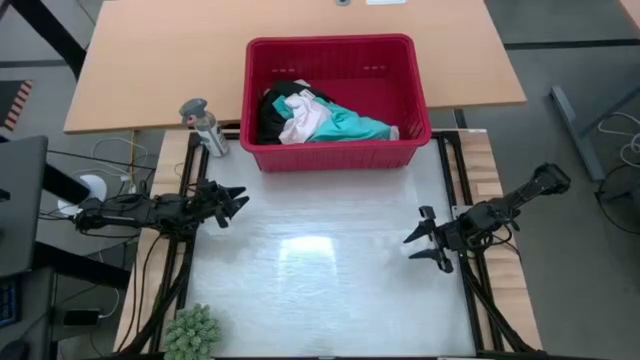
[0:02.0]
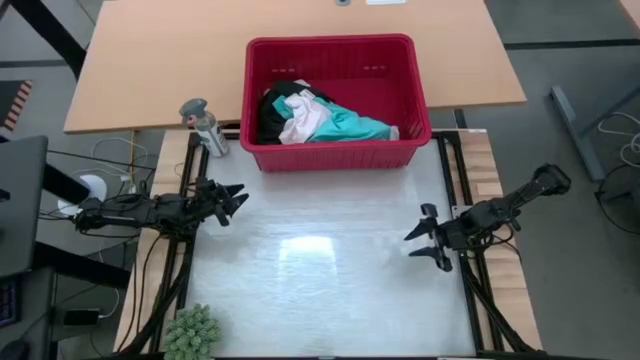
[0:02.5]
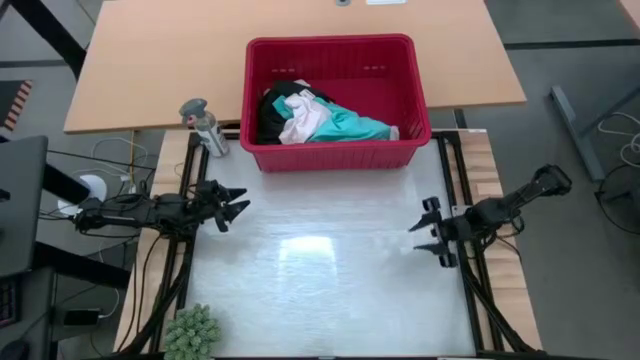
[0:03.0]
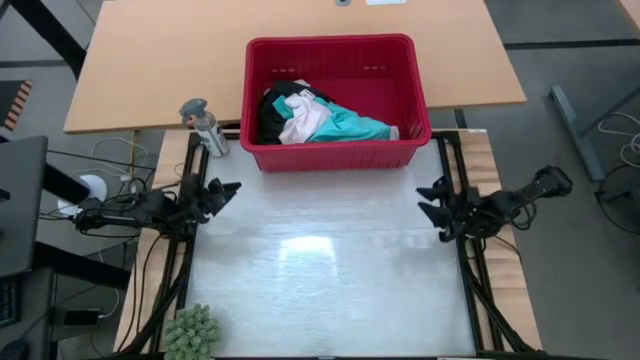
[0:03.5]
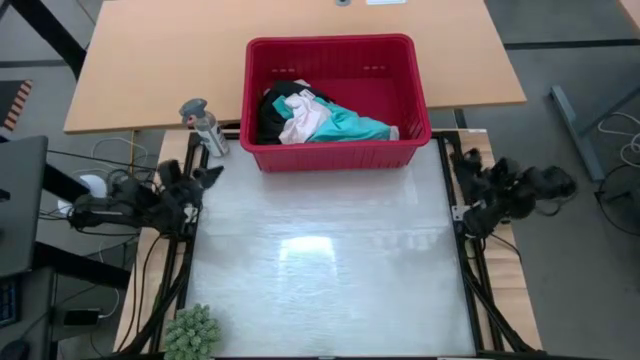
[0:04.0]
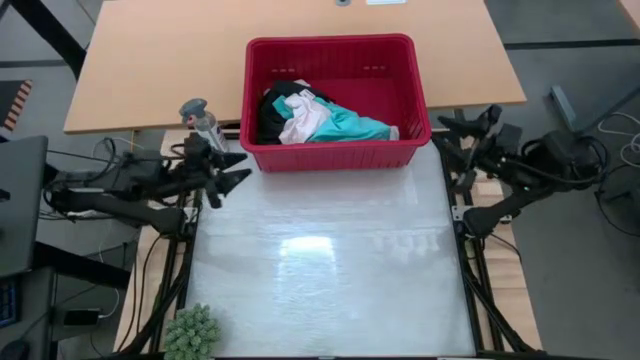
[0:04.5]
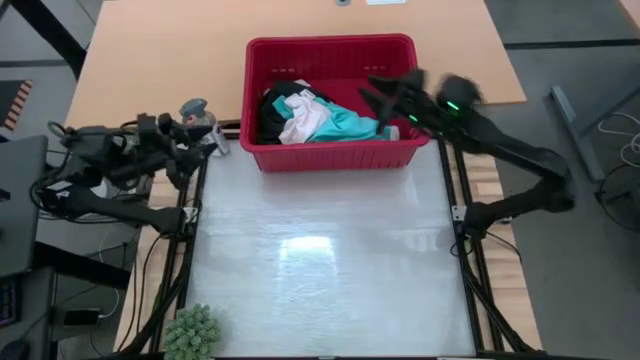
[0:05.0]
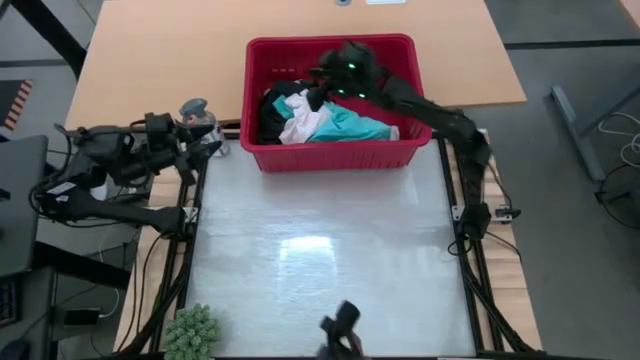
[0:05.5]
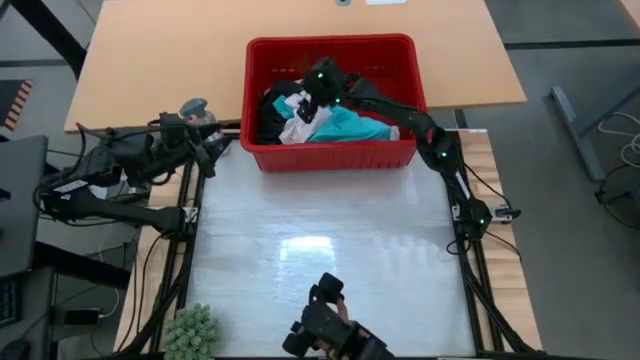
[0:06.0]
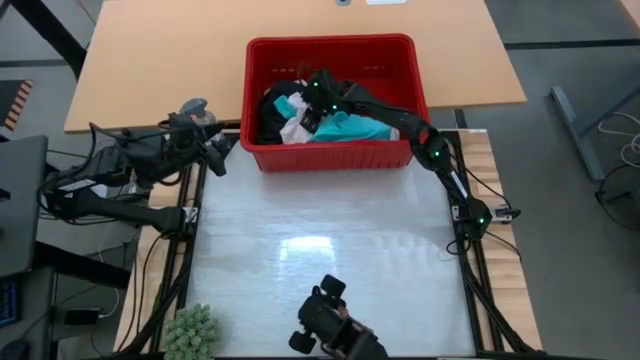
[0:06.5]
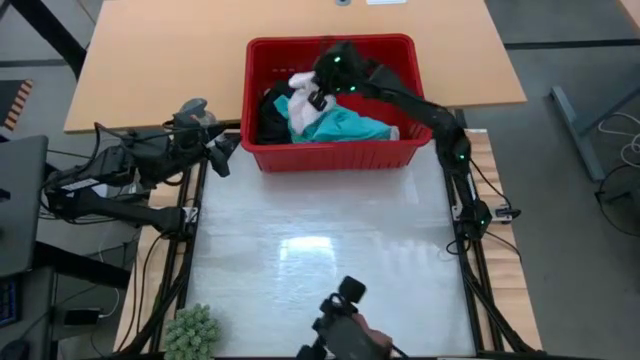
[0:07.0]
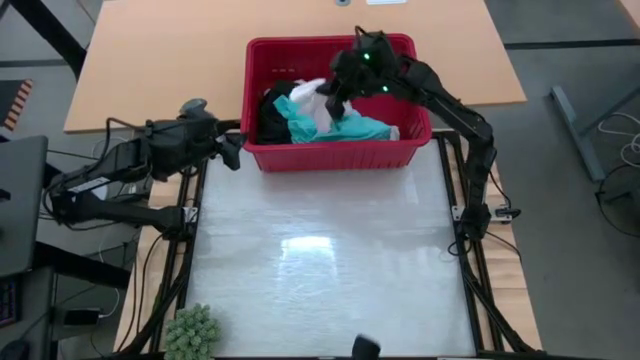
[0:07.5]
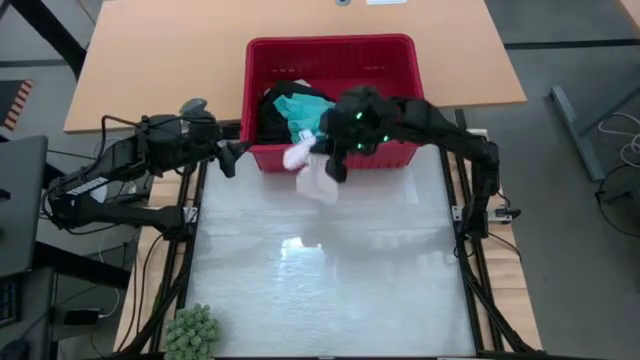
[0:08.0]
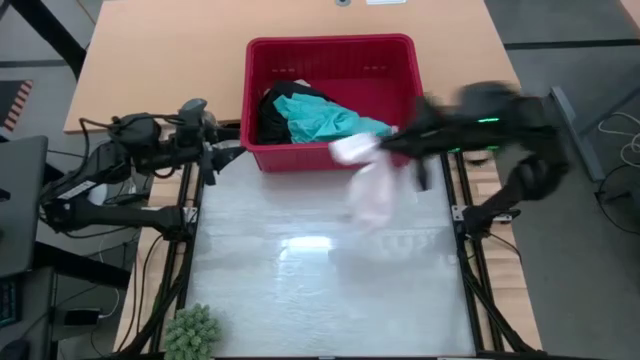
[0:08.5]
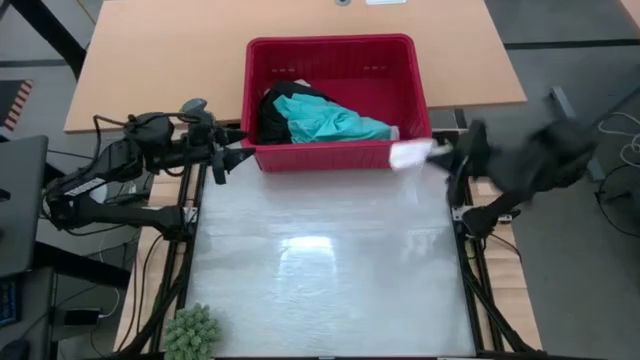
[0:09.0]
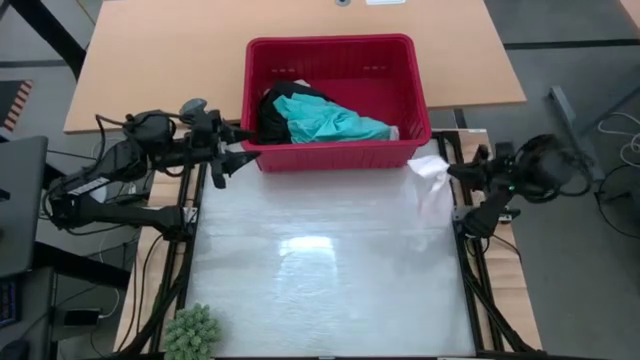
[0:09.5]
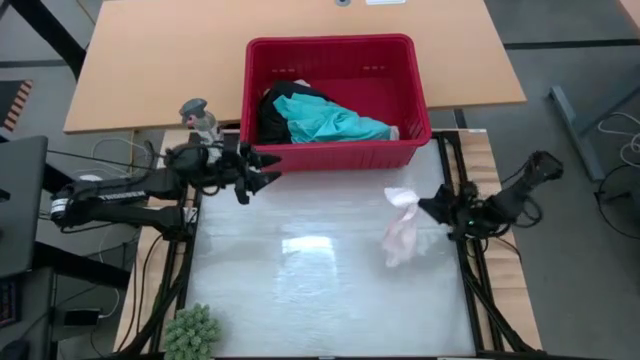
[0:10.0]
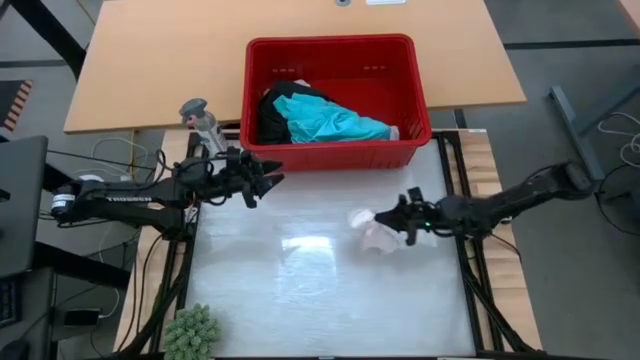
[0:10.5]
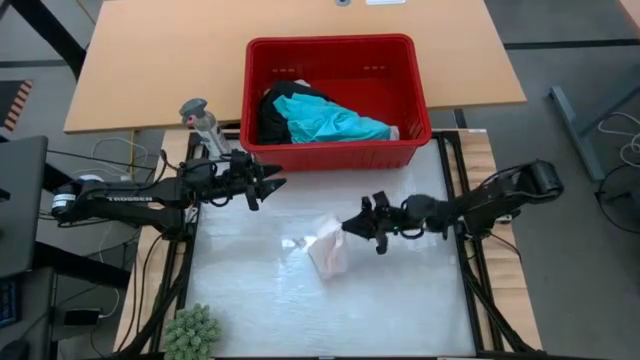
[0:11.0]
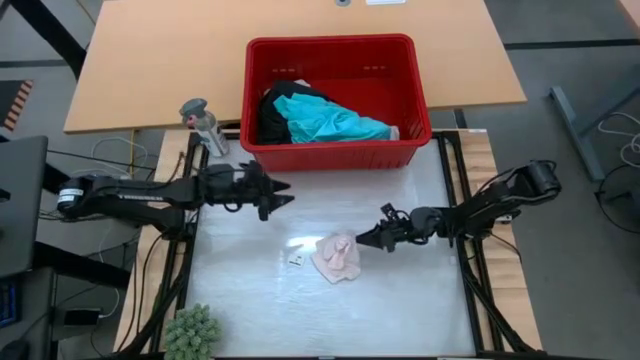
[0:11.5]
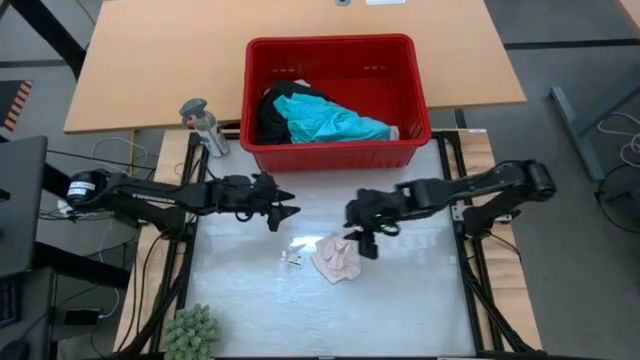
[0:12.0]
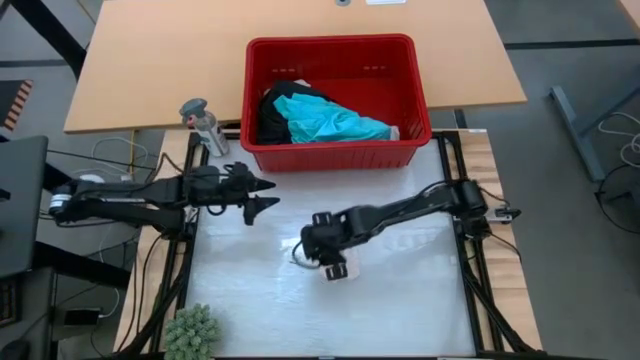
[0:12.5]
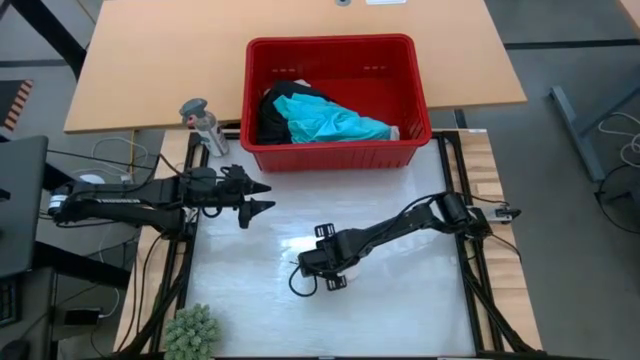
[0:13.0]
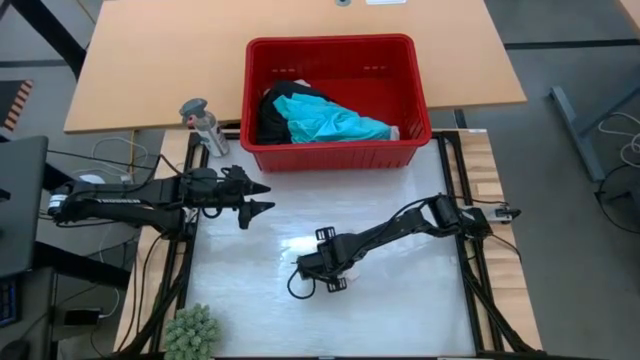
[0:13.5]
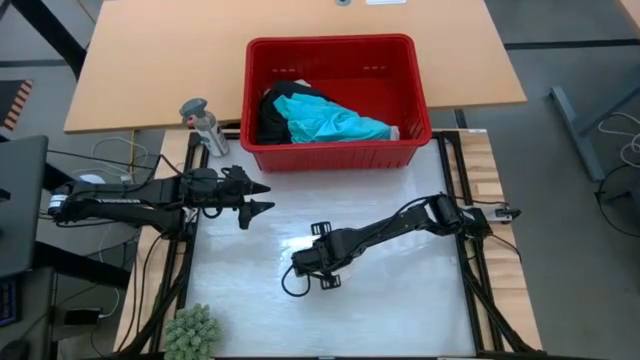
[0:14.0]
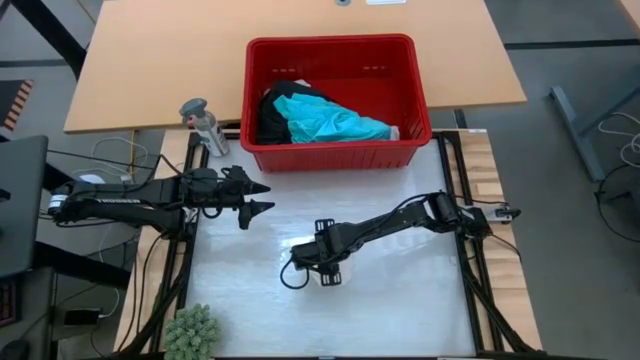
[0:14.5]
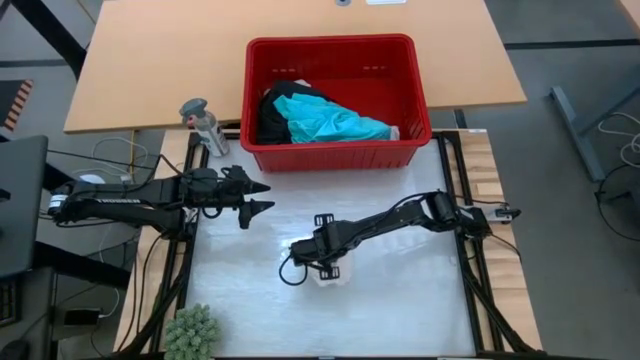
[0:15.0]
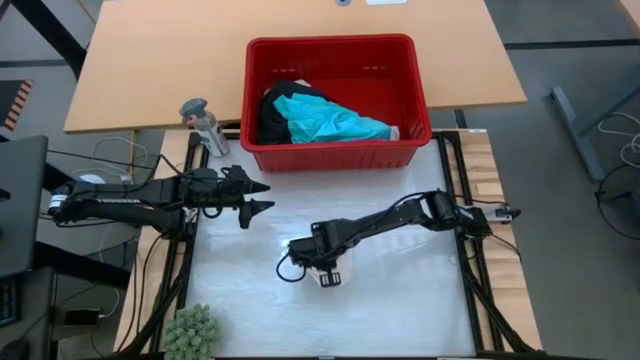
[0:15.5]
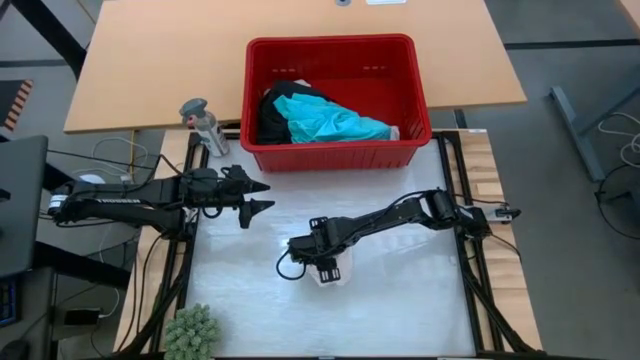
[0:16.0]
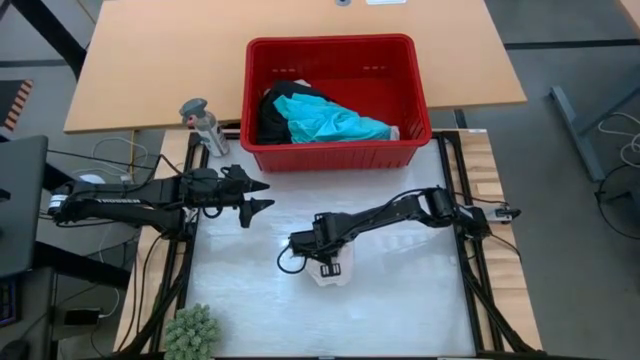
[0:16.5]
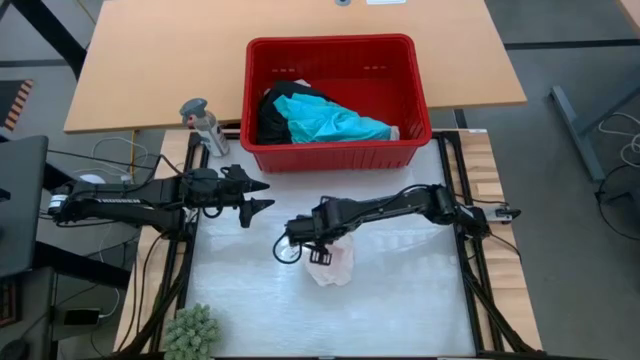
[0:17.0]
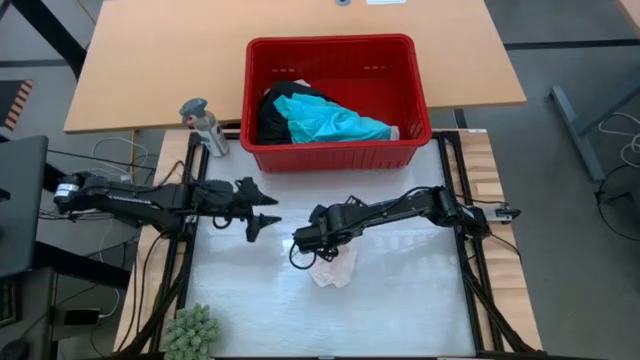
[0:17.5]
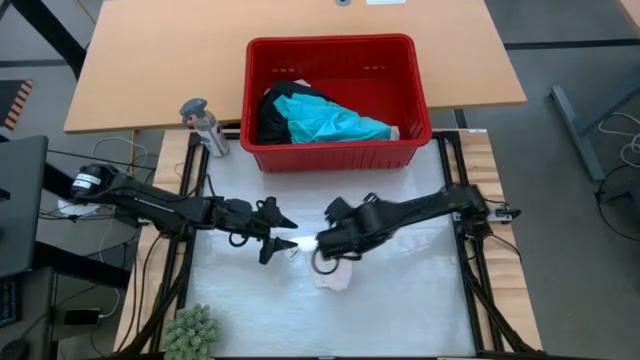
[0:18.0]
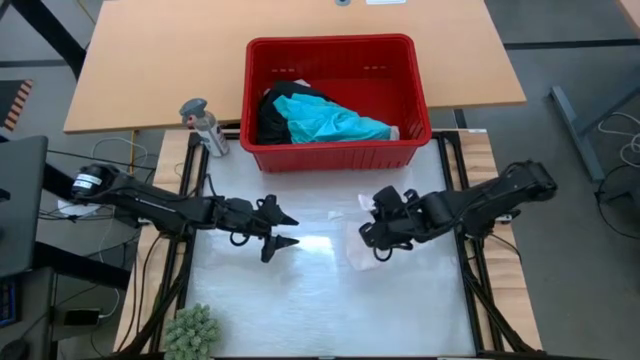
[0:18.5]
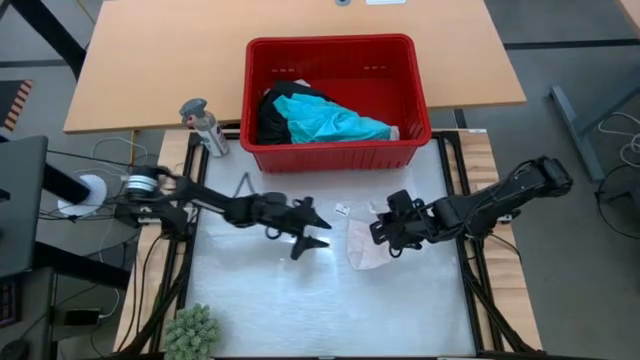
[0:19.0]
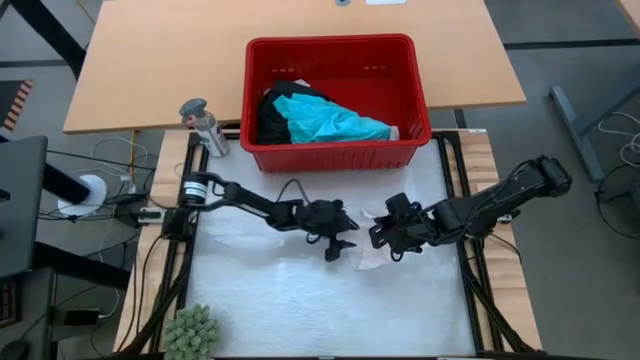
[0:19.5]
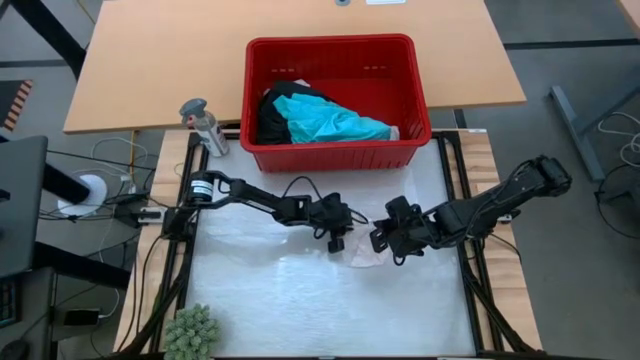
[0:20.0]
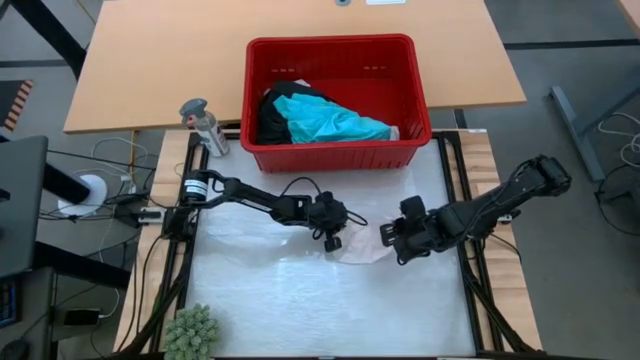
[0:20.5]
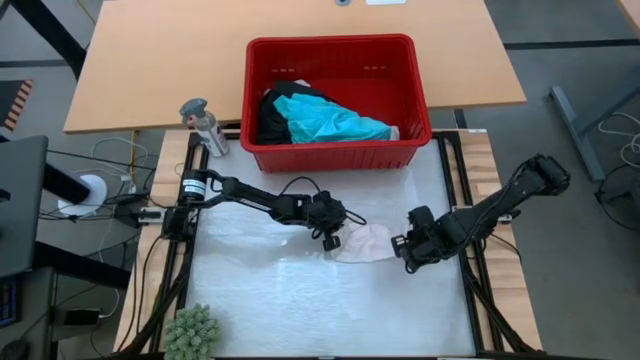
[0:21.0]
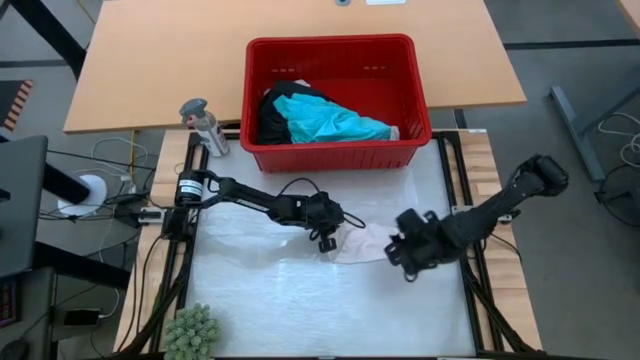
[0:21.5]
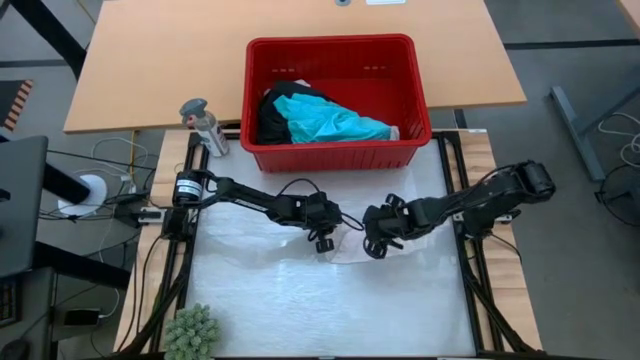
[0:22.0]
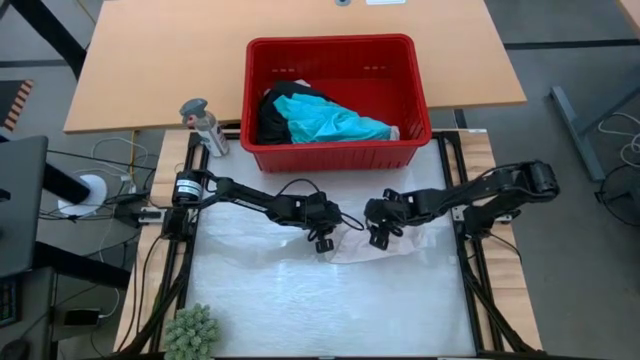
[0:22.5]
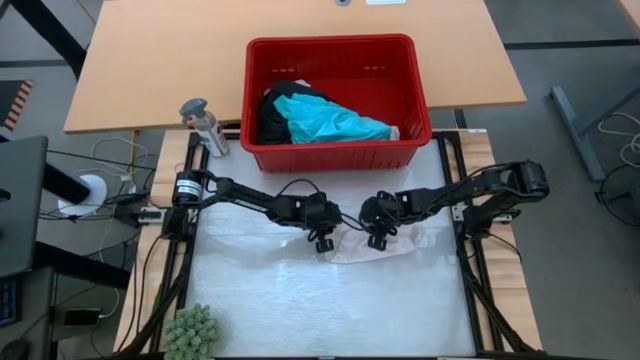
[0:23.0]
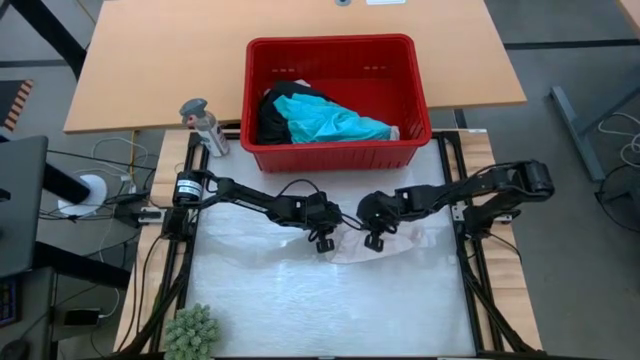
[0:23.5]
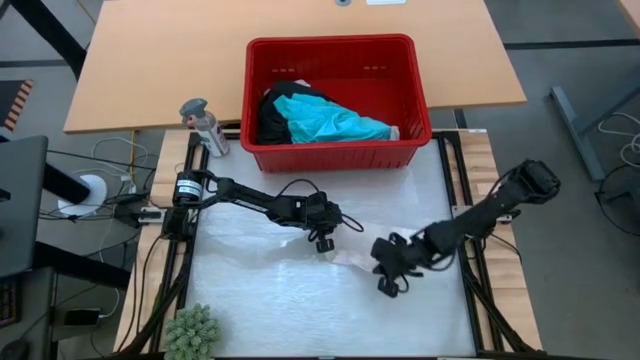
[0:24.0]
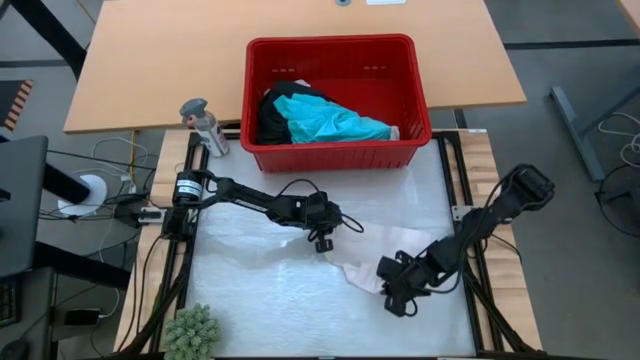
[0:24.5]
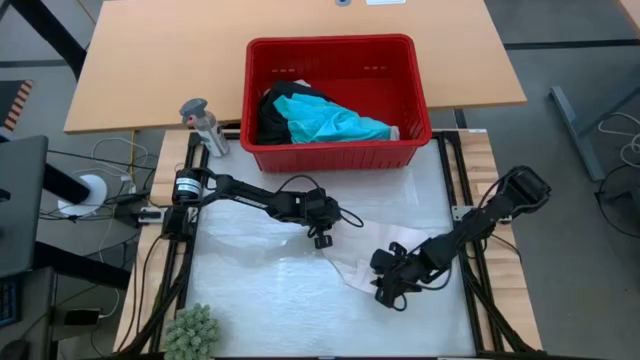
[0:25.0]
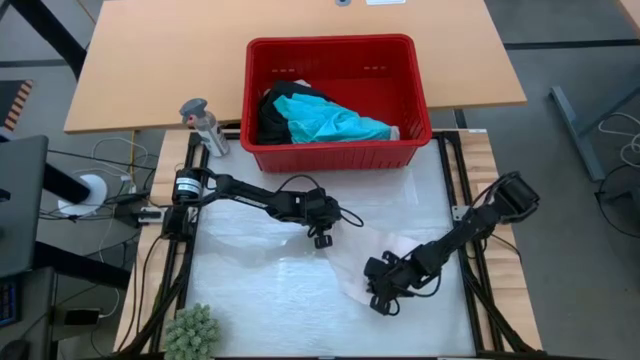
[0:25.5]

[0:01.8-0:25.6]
Task: Fold Laundry from Bin
Fold the white underwear
